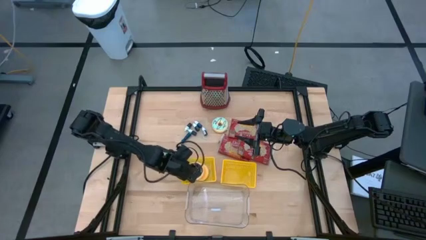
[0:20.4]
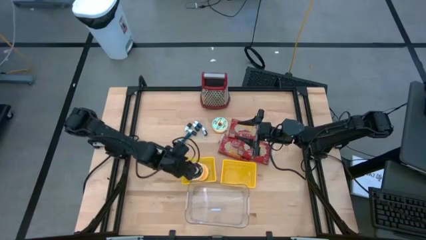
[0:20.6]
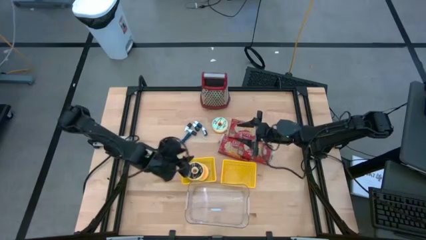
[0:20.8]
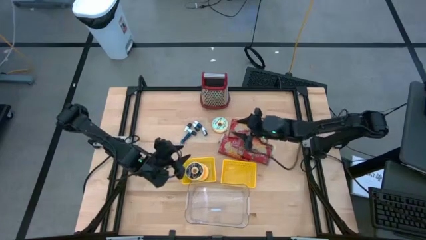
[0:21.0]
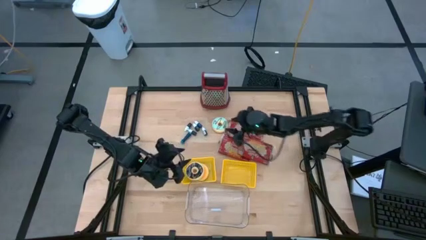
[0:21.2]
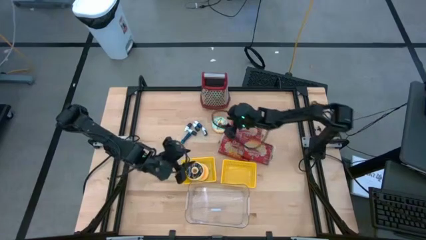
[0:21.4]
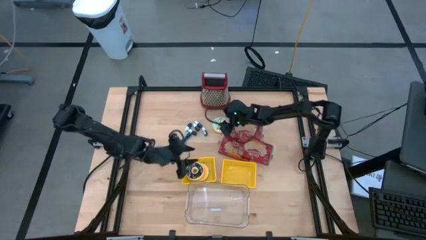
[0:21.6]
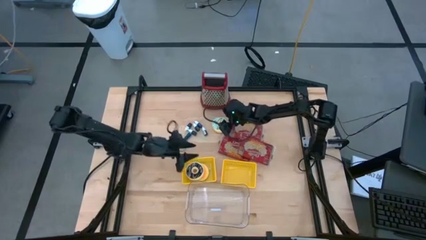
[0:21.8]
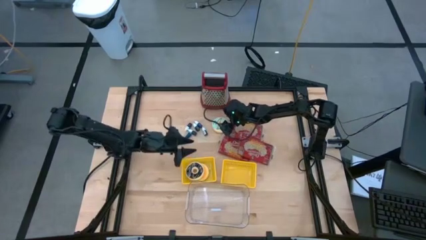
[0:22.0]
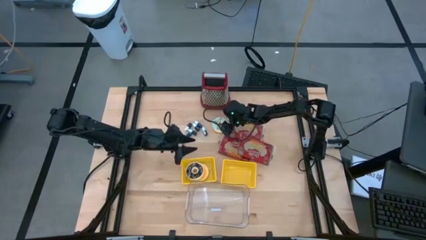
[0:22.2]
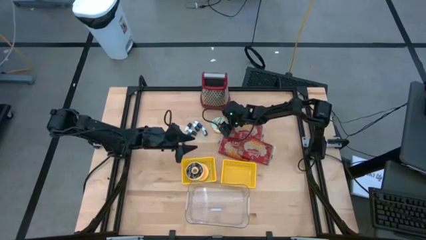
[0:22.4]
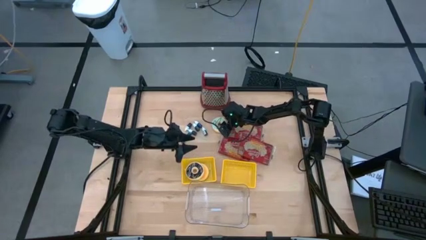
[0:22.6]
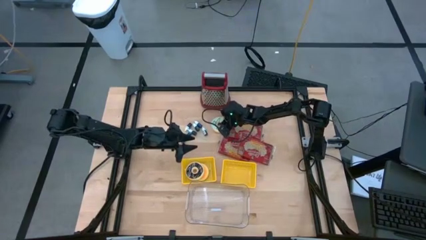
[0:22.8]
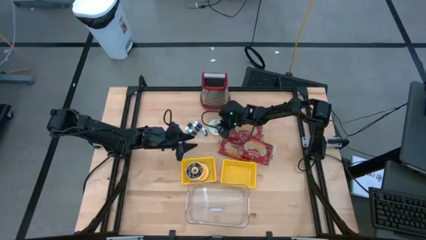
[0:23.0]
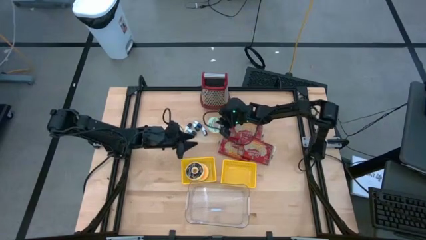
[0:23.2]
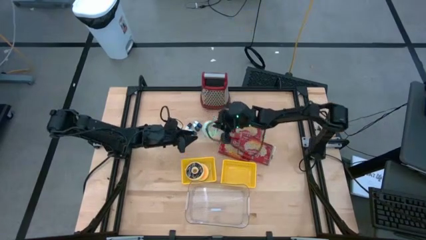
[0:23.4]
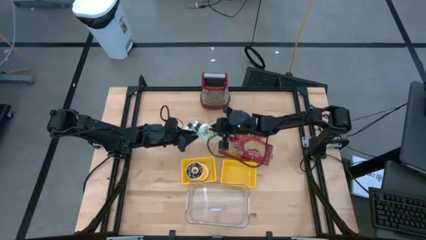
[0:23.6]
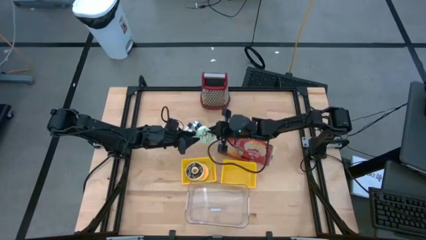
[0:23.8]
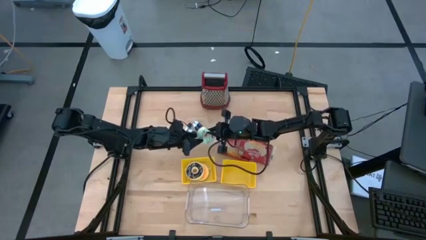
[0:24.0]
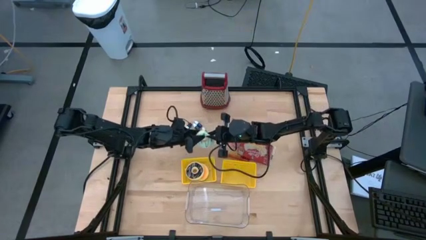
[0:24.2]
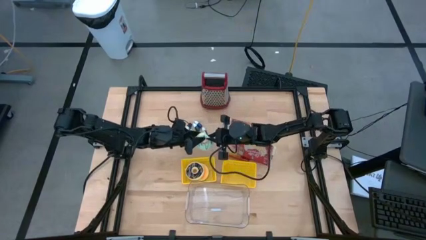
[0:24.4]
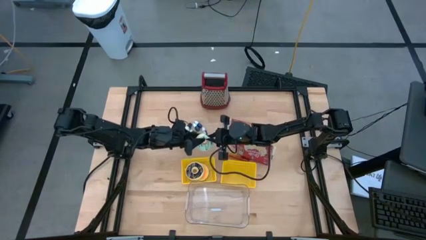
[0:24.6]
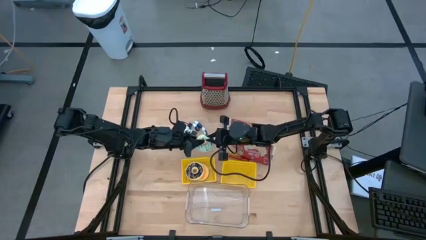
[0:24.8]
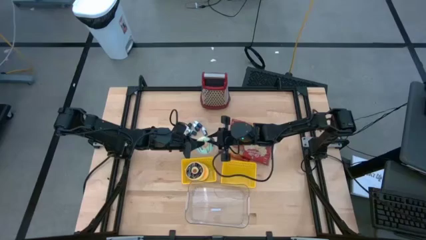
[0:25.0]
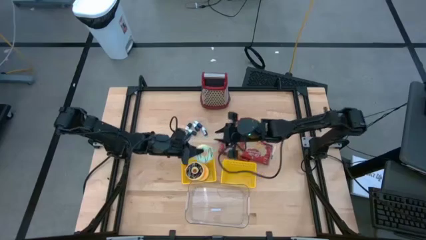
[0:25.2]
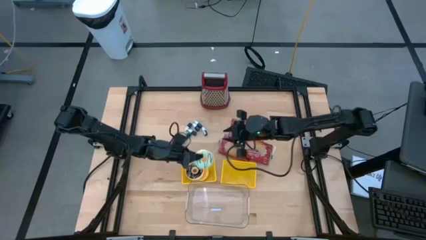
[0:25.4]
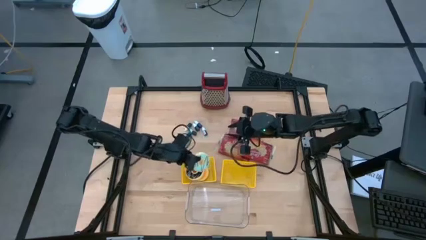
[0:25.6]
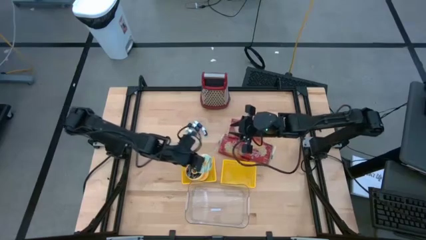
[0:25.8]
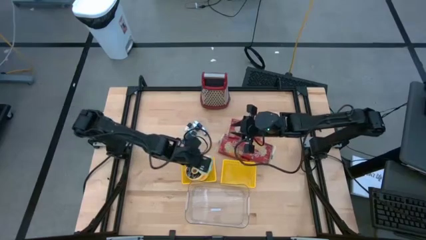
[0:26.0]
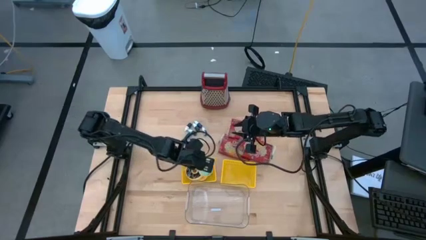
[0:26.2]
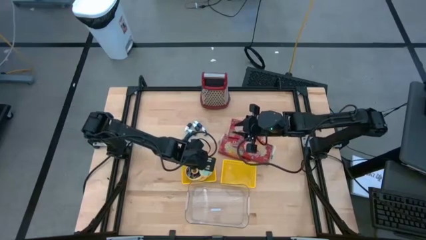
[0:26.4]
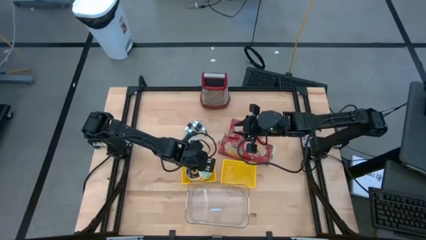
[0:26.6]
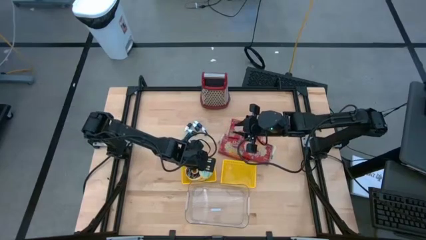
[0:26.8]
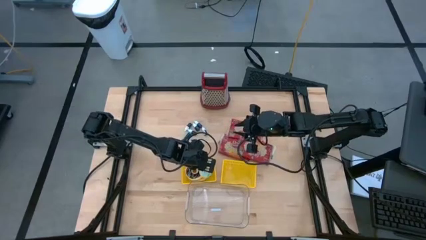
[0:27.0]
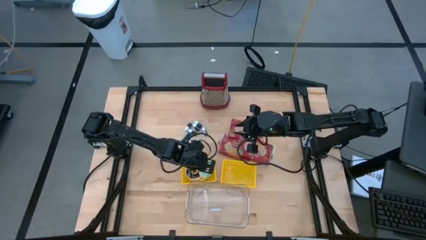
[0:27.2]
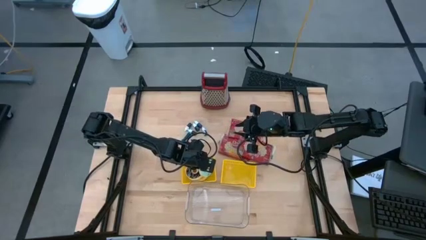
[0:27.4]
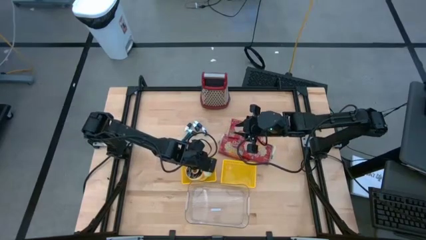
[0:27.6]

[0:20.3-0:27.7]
Put the light blue donut into the left yellow bin

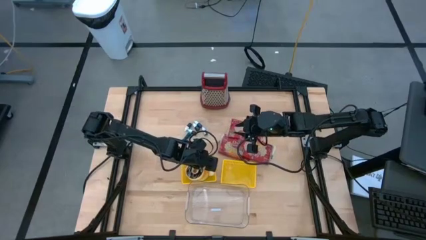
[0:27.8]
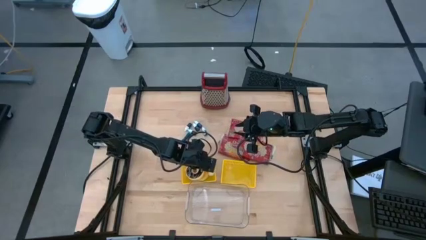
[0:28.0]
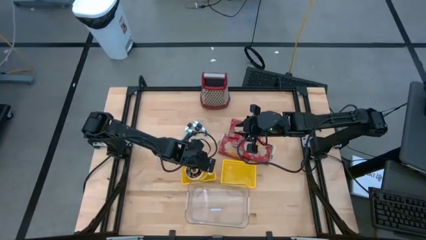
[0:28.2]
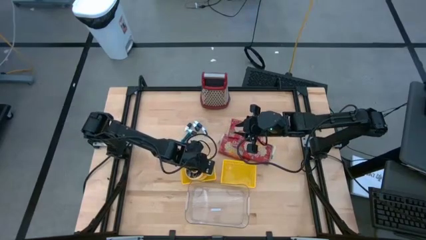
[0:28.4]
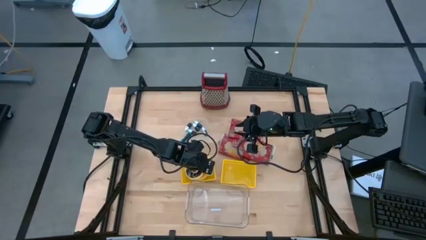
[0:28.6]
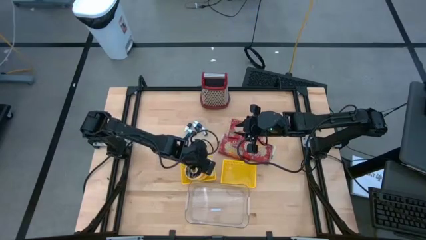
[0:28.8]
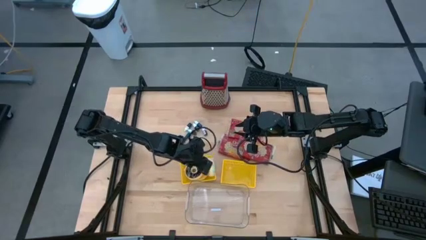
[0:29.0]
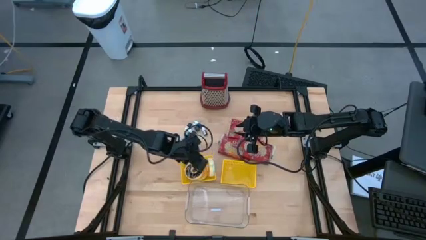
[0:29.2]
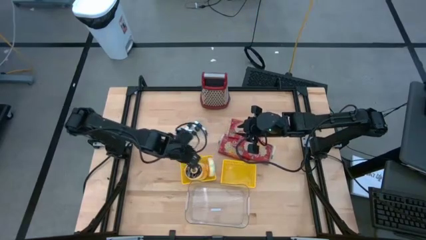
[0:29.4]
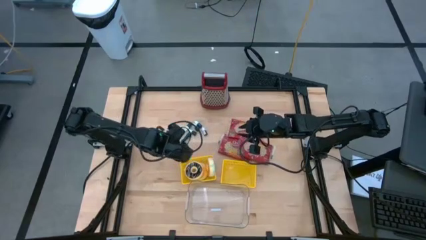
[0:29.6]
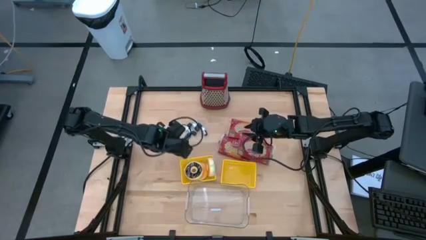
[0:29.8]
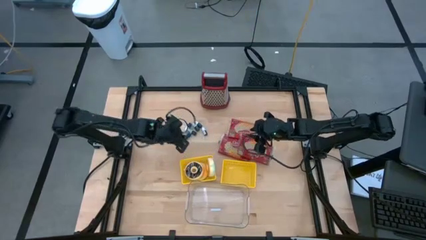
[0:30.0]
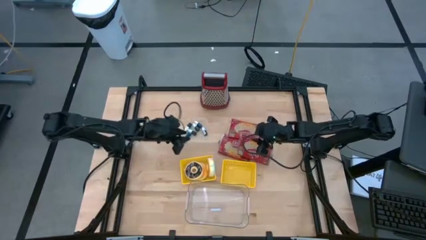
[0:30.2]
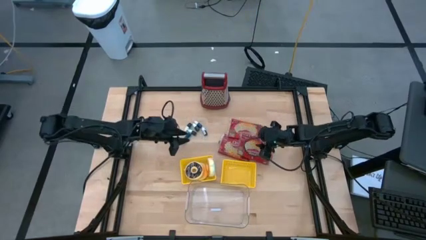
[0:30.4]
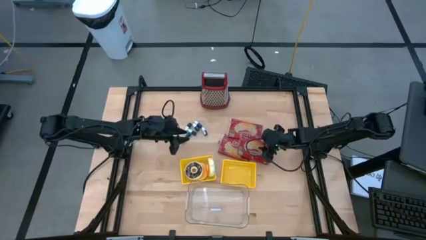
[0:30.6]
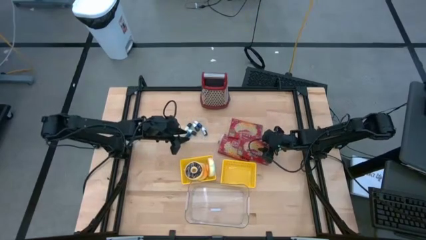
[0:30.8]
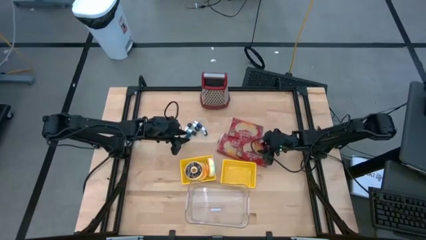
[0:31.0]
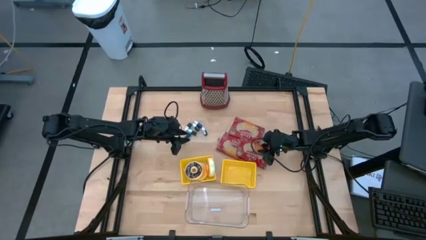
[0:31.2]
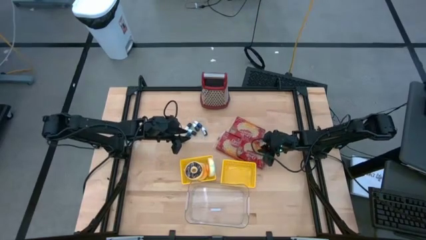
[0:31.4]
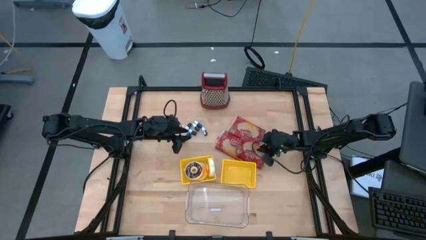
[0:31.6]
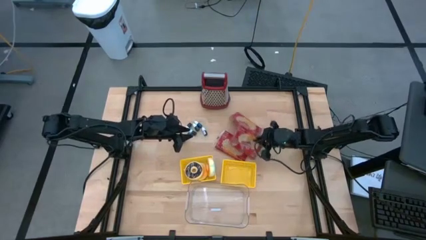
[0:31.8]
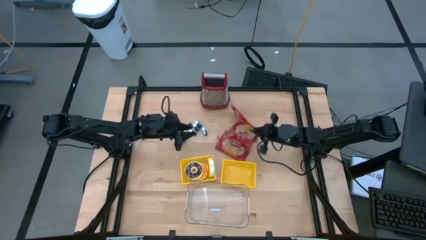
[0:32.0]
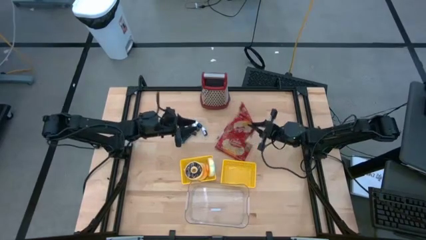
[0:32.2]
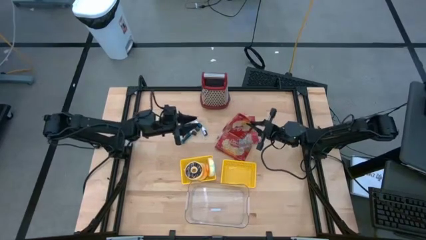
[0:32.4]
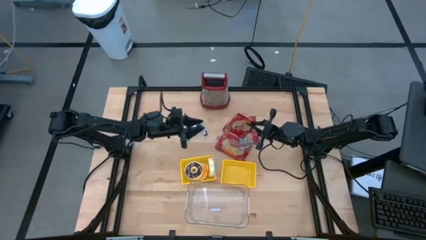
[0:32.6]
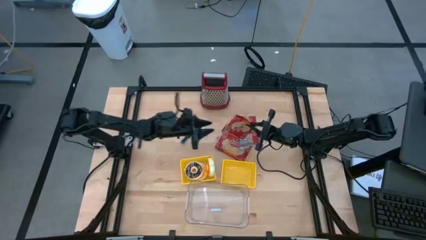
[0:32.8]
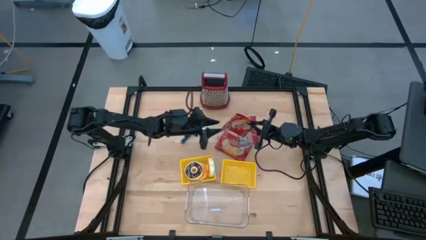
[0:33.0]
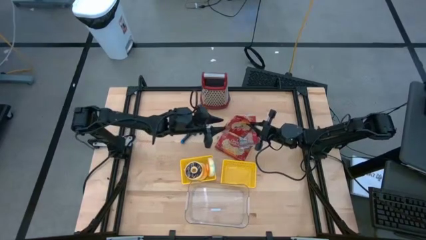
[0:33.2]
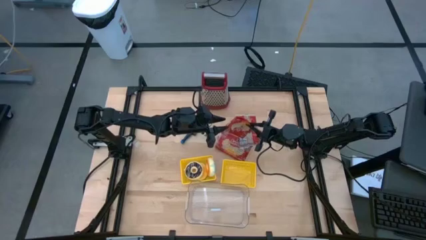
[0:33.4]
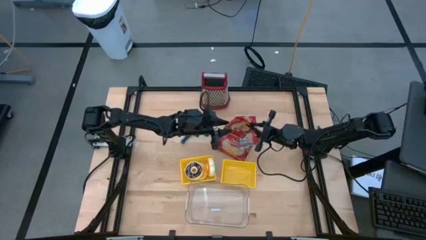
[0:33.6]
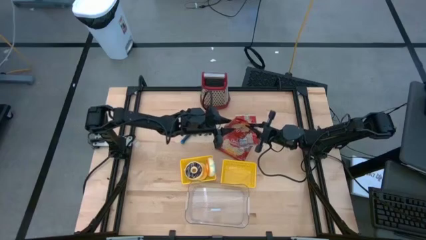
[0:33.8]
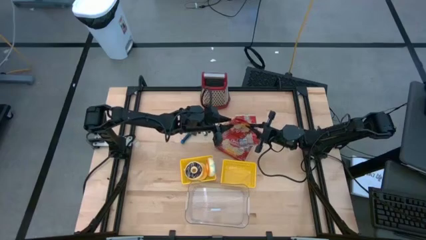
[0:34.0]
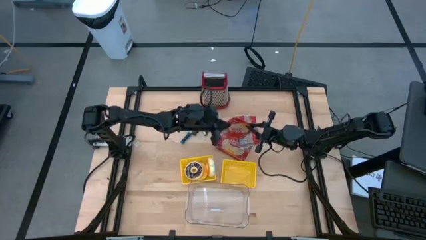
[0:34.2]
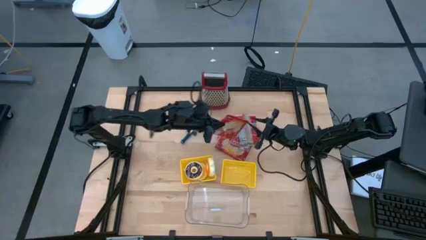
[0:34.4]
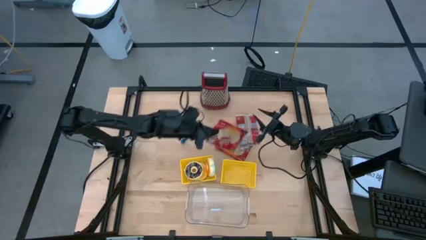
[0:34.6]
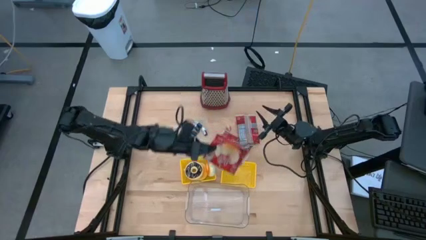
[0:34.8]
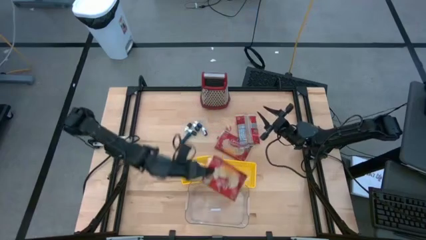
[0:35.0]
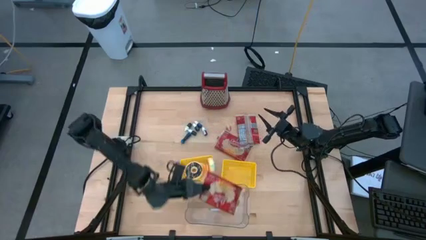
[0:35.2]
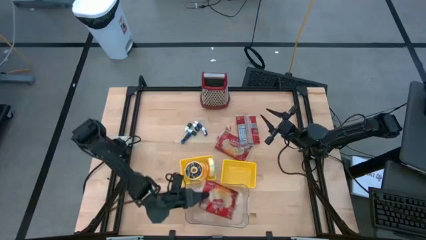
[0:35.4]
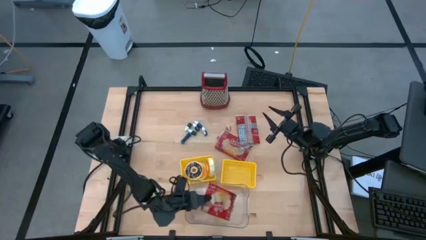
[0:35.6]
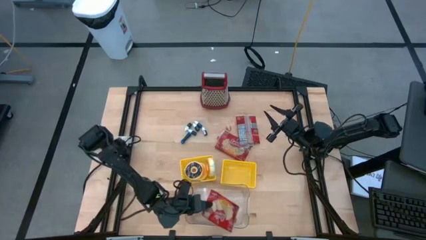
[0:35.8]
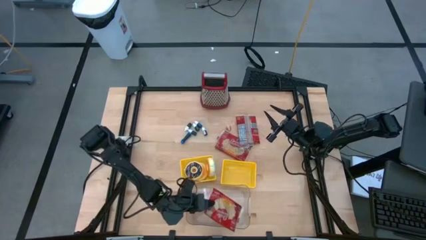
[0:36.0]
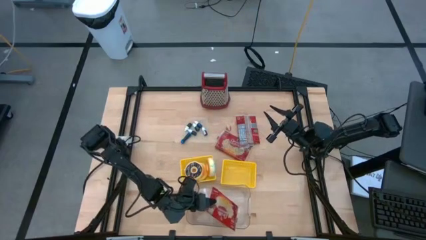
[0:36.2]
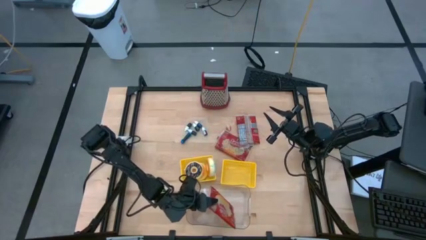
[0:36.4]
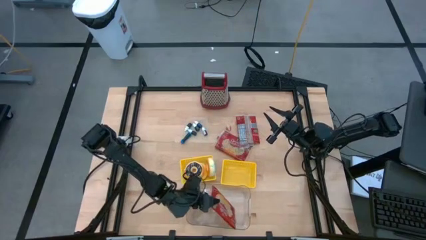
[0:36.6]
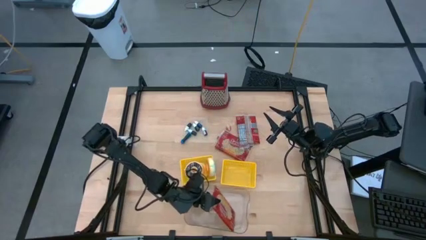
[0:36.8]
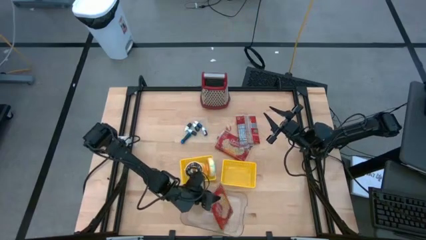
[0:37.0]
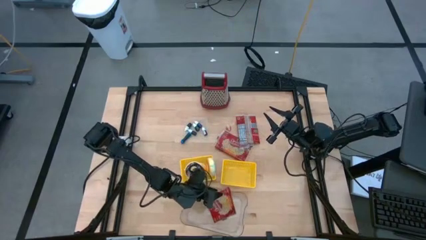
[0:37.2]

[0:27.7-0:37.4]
Put the right red popcorn bag into the transparent bin
